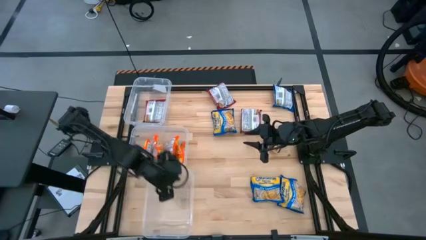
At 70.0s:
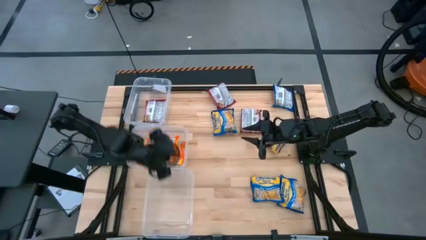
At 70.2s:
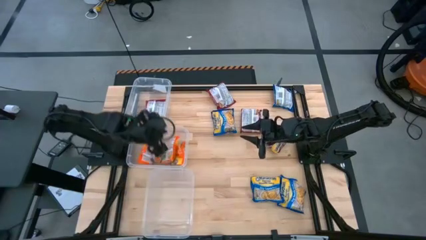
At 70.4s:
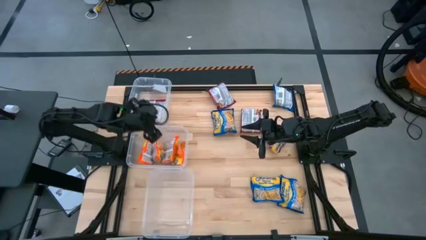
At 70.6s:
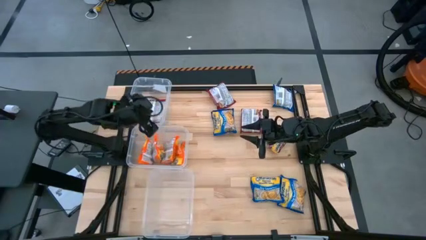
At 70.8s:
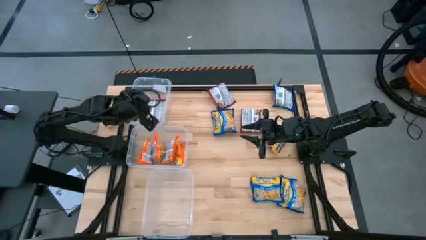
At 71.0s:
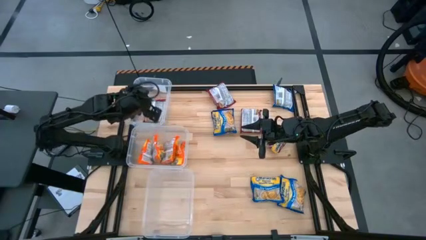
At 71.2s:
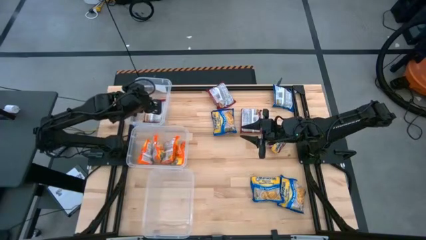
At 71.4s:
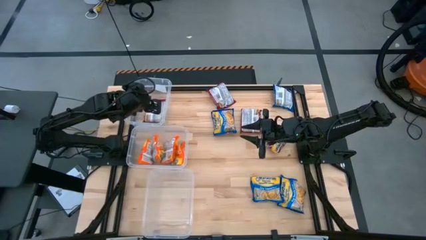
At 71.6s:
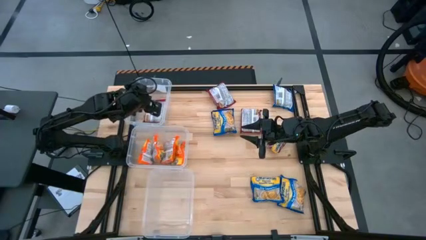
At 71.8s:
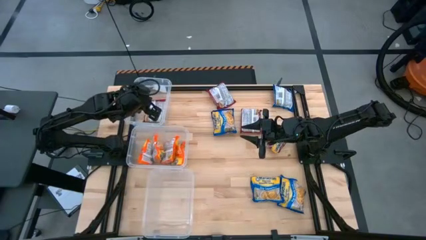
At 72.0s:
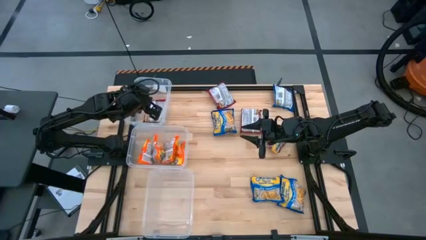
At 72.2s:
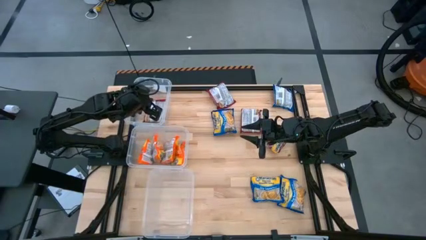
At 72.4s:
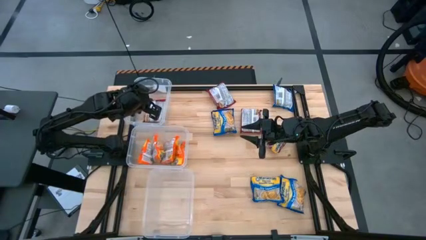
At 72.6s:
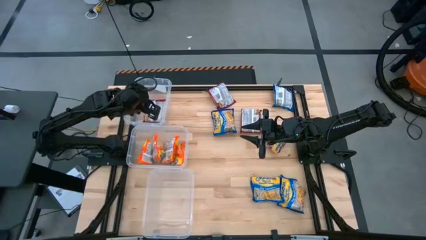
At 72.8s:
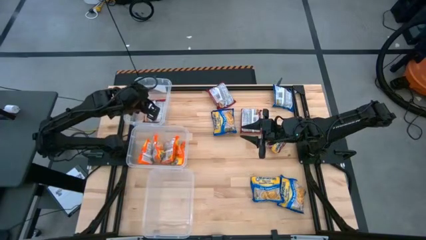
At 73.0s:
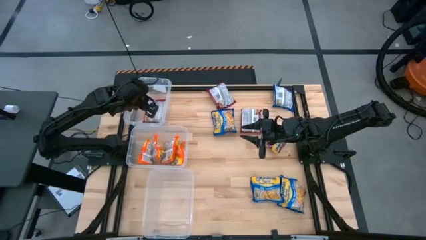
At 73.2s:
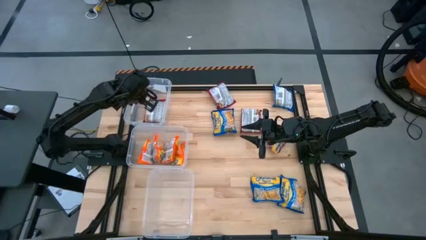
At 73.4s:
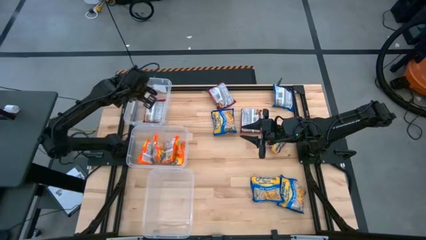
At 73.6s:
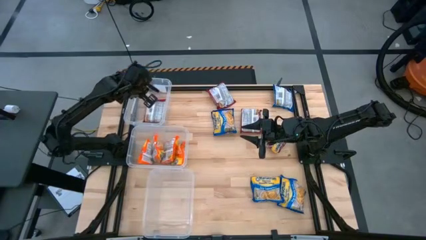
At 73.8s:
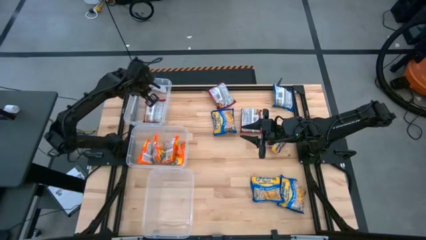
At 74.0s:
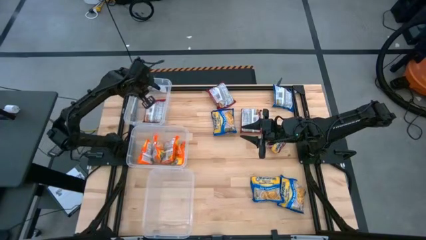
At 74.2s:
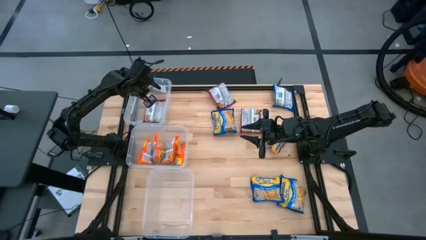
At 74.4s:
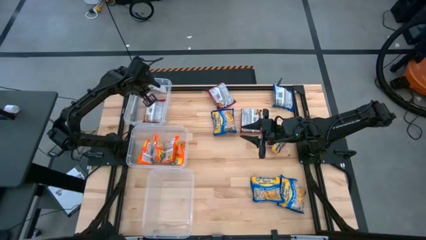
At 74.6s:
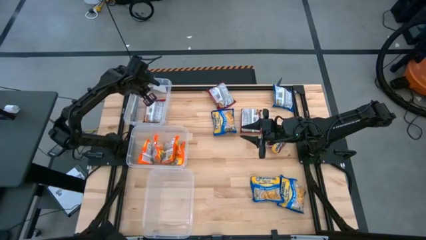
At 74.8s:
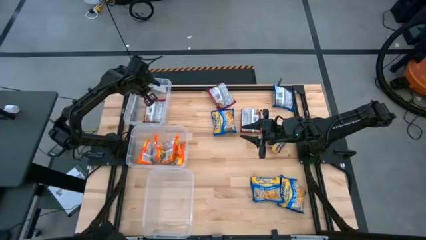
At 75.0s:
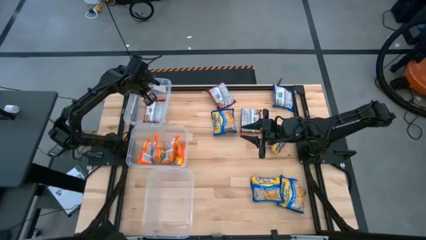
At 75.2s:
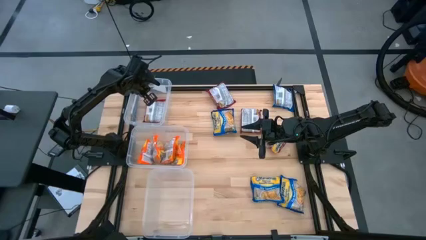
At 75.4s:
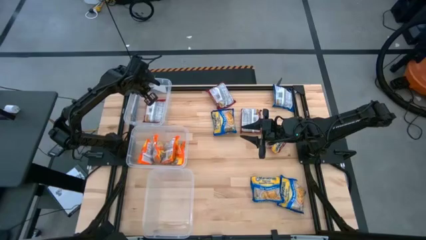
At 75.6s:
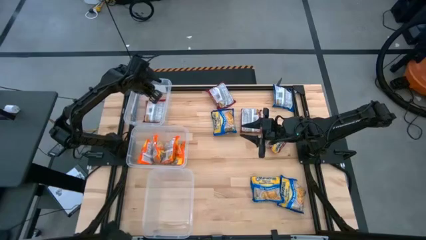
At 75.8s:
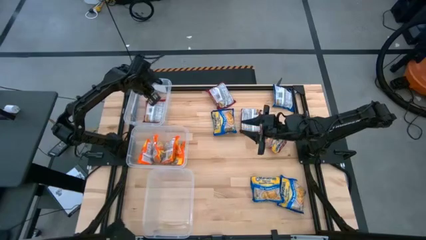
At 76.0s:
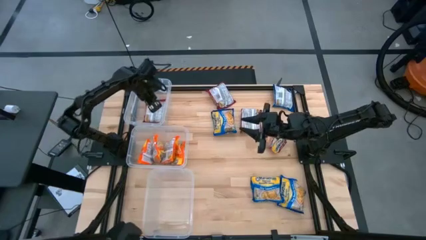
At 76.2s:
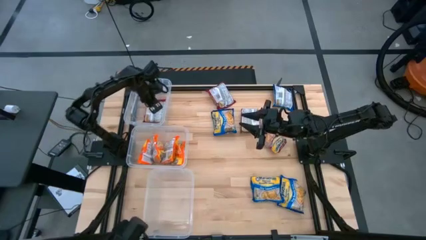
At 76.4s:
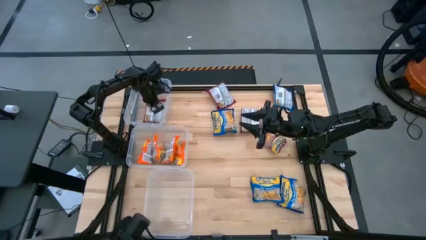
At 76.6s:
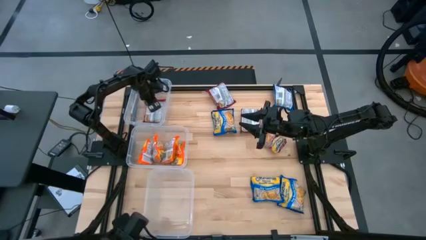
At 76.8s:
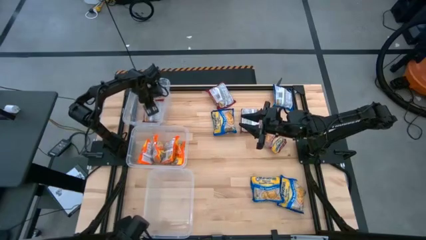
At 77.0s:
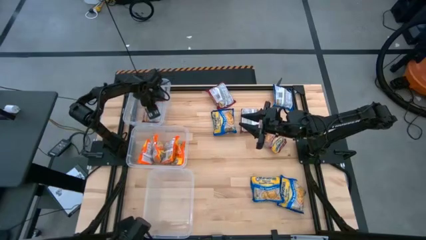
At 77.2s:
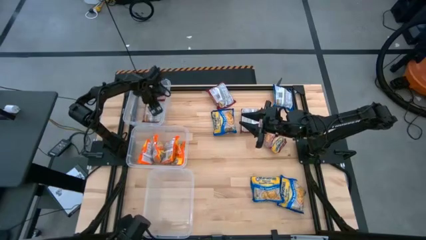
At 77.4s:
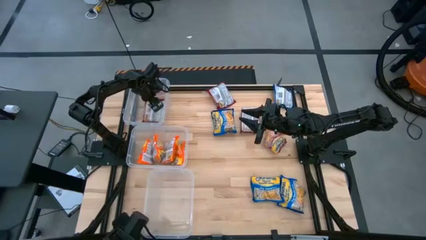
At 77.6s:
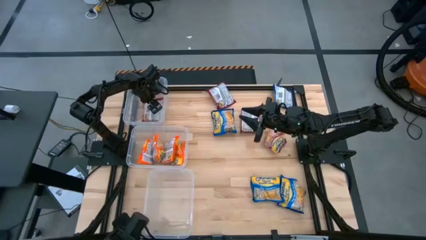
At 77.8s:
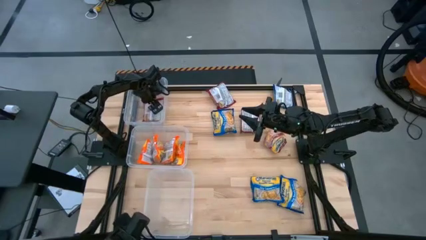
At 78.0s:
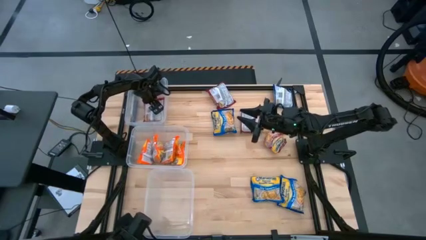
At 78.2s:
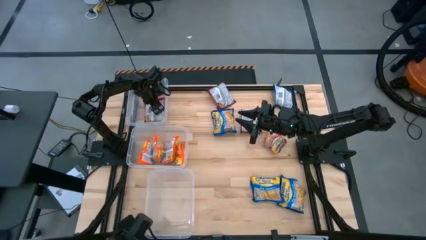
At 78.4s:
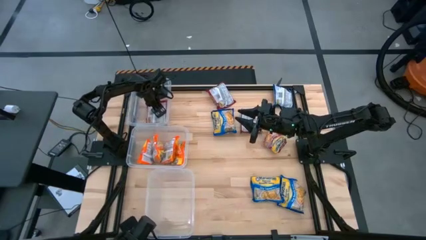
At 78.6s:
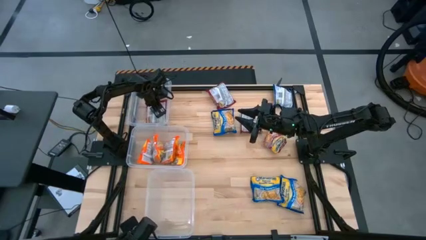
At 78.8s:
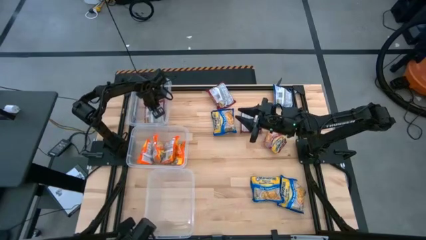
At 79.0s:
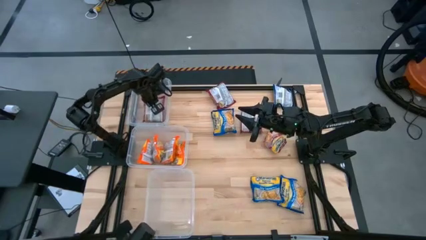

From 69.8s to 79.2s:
Task: Sort Maruchan noodles
Adjust the red noodle pack in the top transparent bin

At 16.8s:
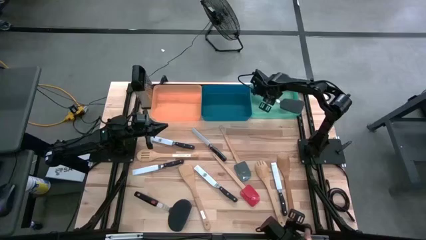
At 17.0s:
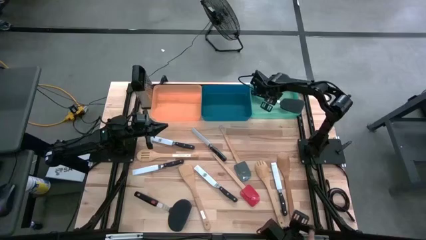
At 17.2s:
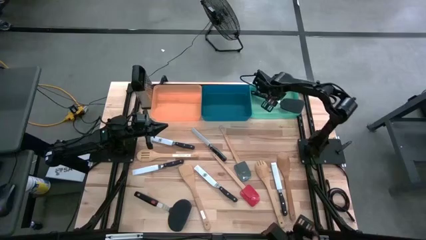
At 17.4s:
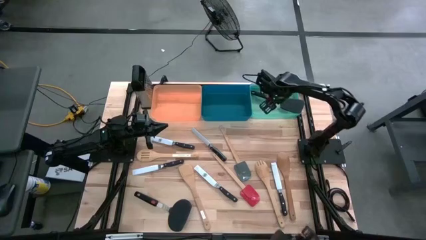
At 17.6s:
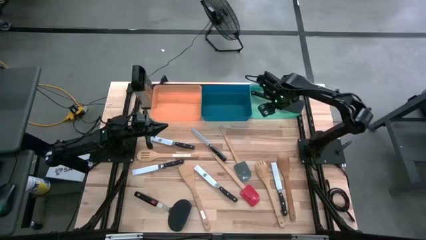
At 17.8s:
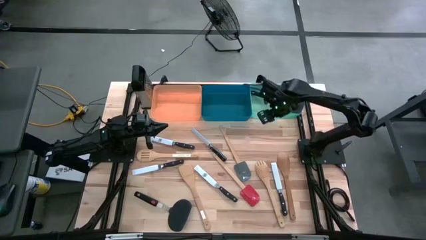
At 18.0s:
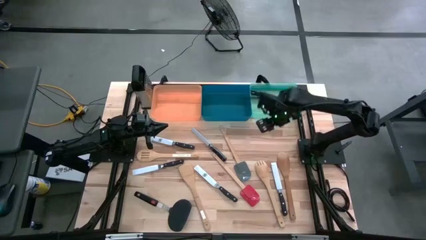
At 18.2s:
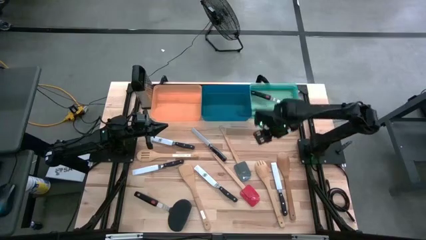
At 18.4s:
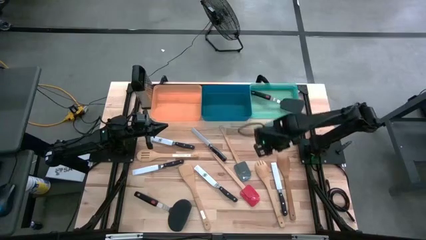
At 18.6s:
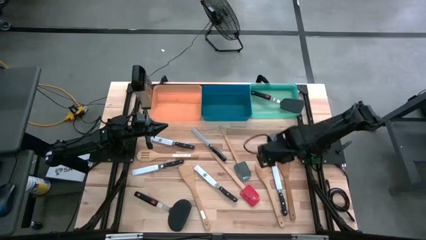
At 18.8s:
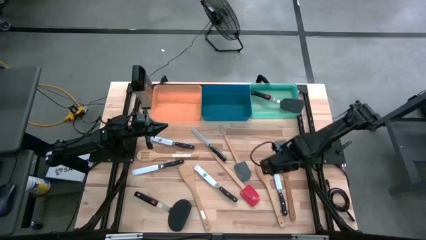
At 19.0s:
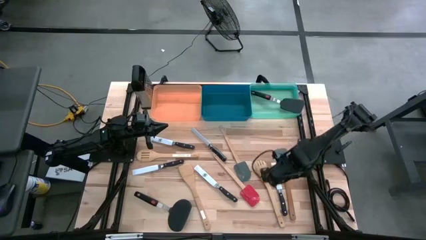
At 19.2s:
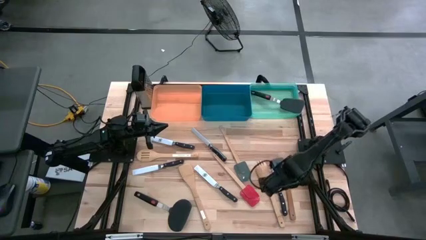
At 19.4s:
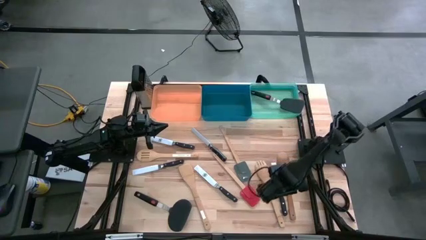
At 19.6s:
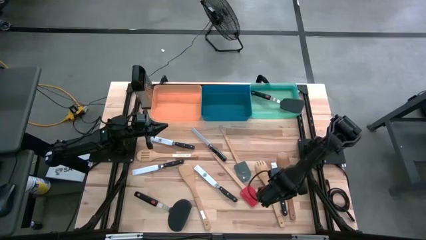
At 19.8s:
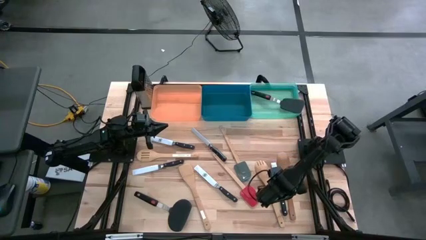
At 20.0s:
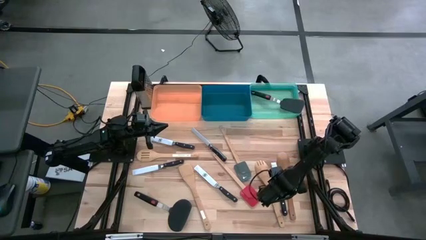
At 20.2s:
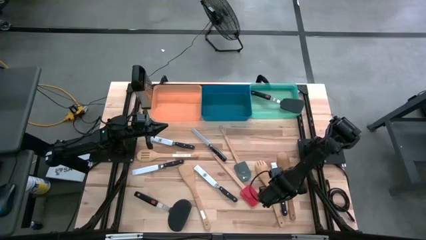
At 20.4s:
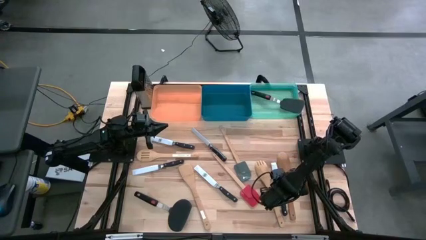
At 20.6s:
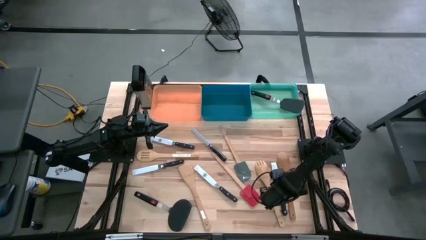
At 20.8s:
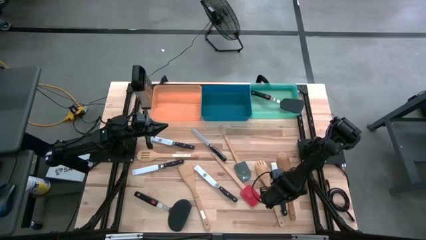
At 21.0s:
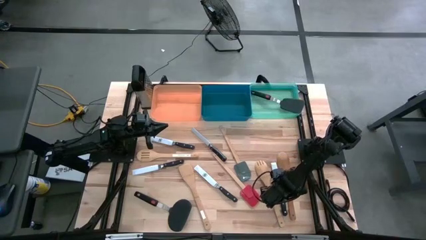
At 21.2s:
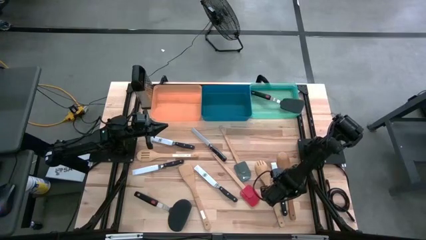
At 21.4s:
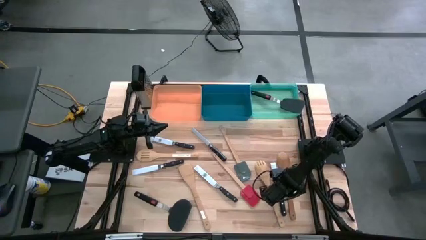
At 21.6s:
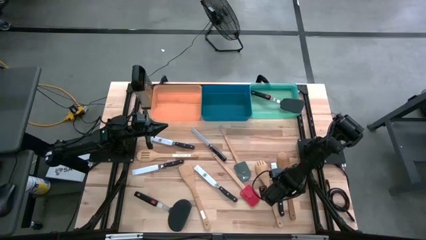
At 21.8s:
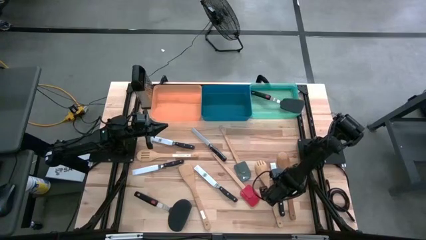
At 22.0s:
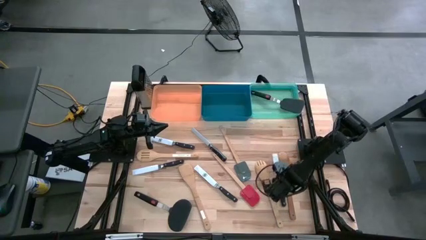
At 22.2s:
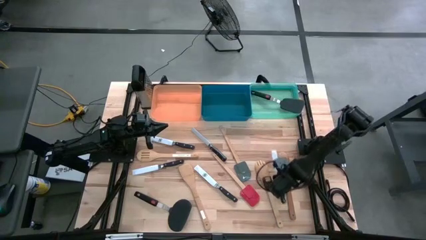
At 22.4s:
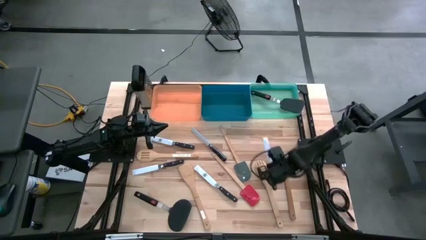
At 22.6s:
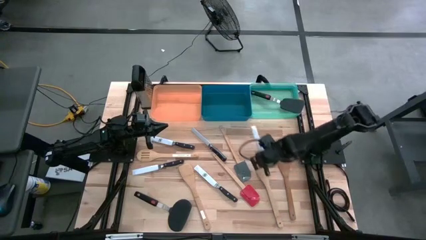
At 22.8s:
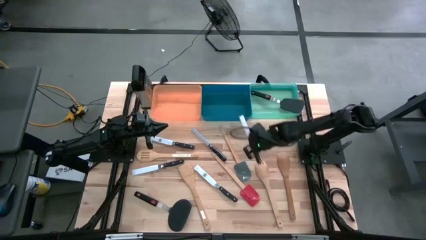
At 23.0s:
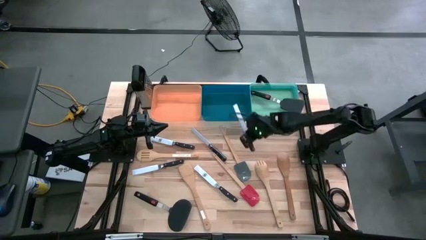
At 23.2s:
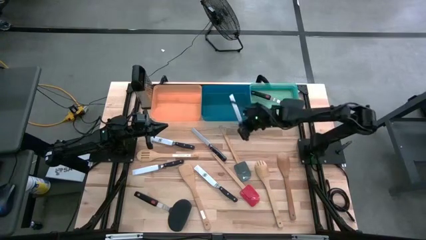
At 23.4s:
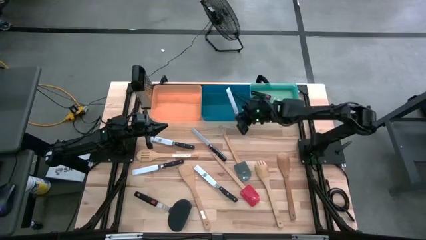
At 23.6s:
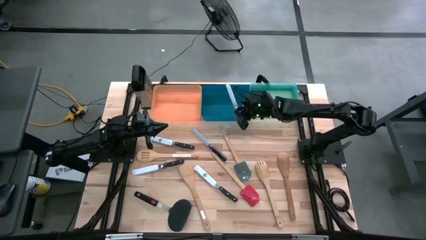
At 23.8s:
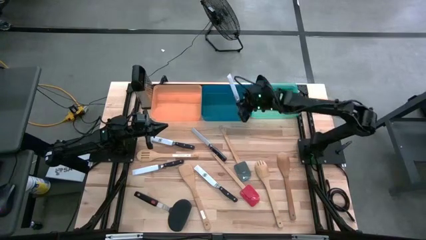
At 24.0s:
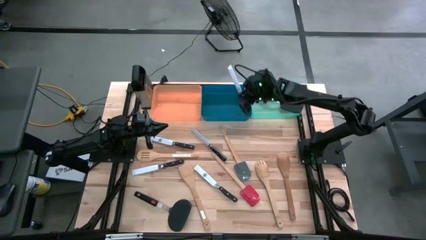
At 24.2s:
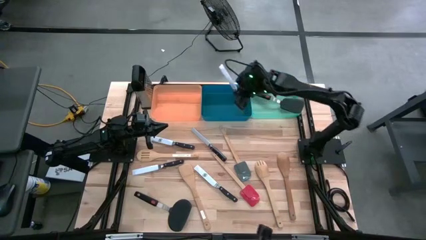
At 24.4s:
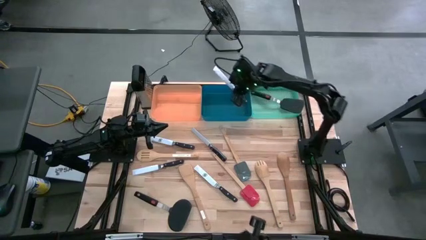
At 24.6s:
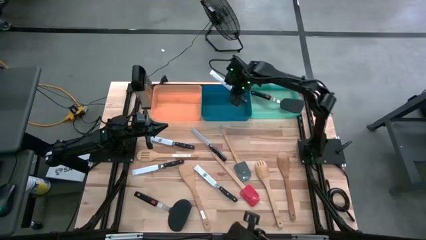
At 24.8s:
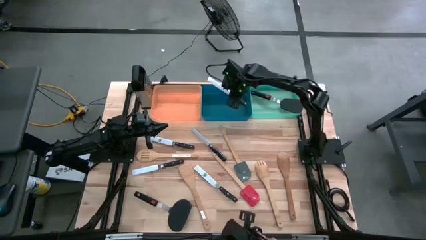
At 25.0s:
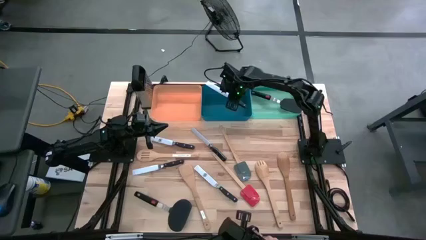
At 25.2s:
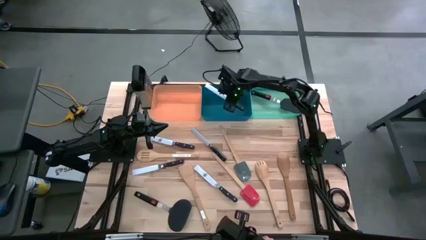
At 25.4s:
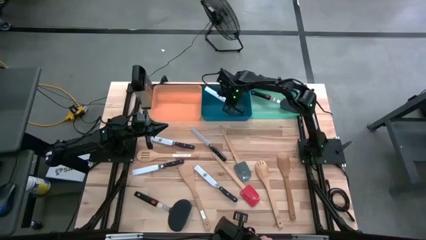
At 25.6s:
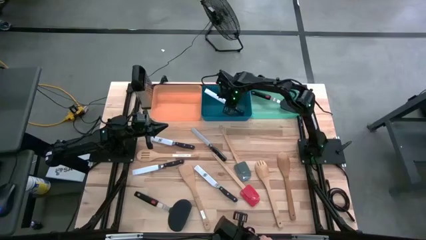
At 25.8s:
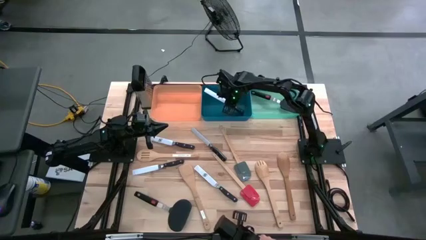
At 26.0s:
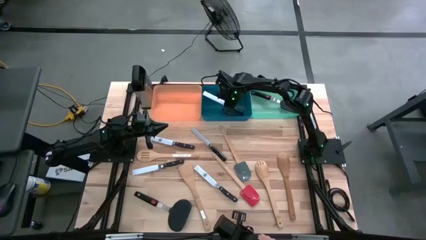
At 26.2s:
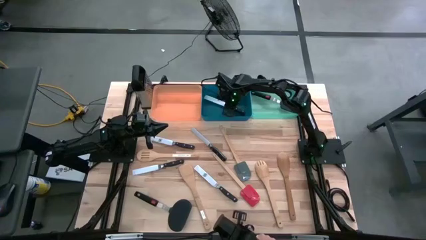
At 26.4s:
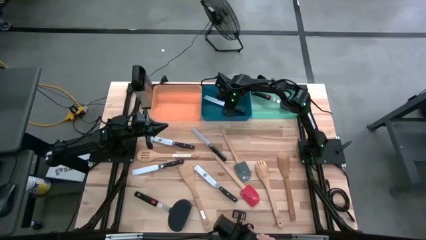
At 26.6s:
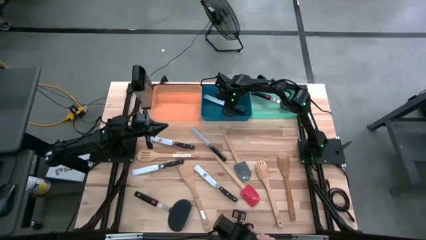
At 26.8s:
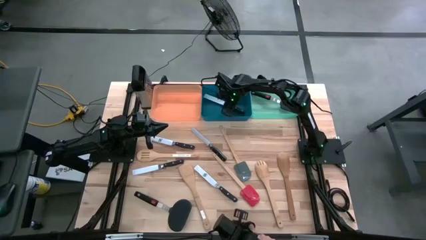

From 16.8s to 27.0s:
Task: Pick & Place Kitchen Items
Put the knife into the blue bin
